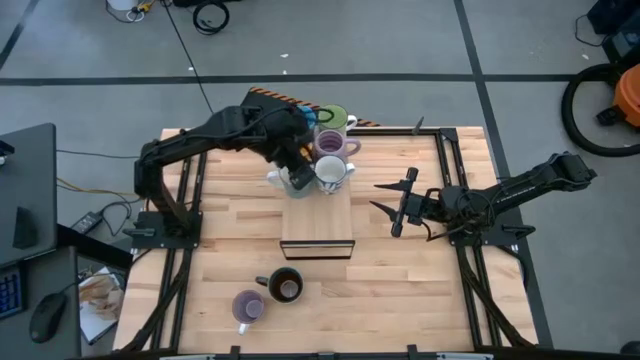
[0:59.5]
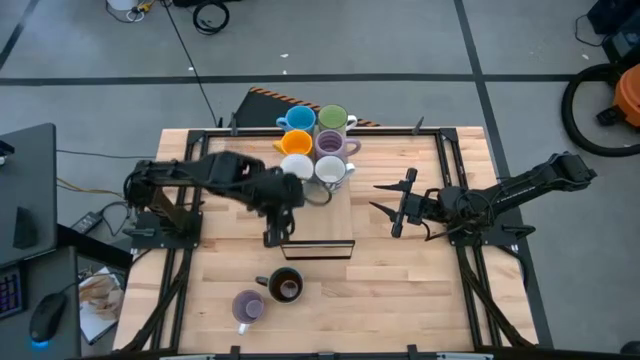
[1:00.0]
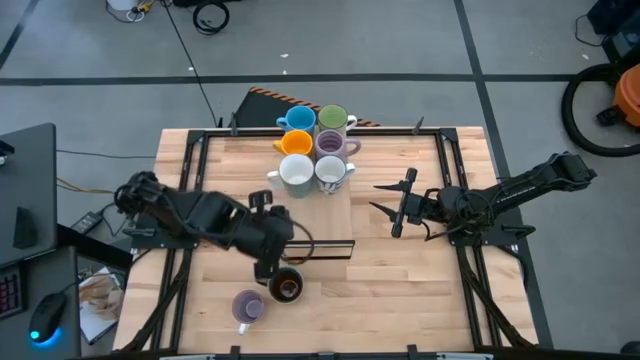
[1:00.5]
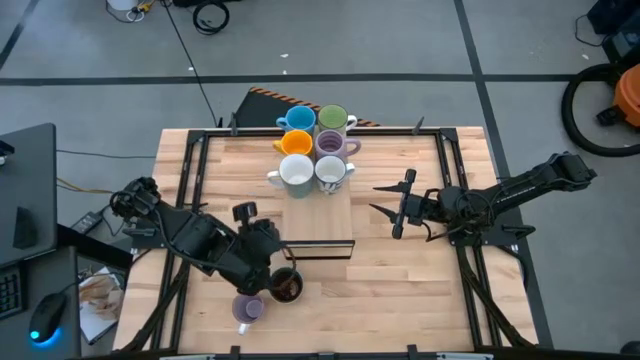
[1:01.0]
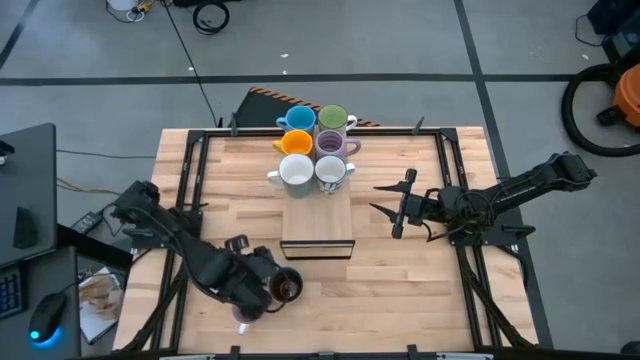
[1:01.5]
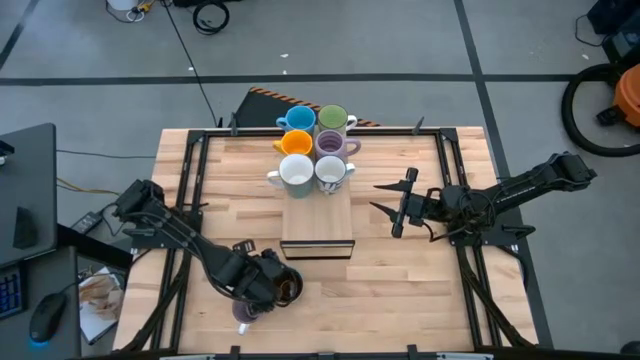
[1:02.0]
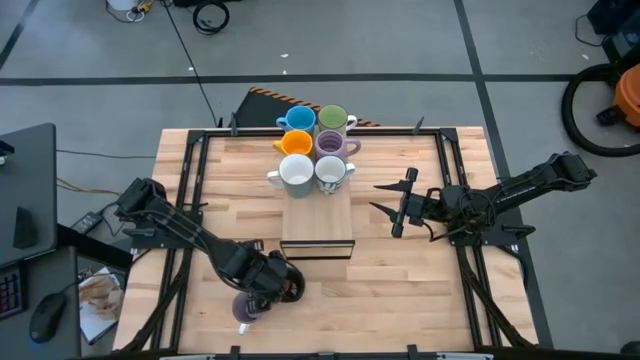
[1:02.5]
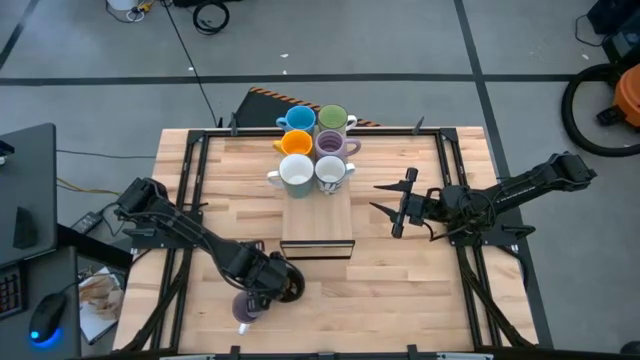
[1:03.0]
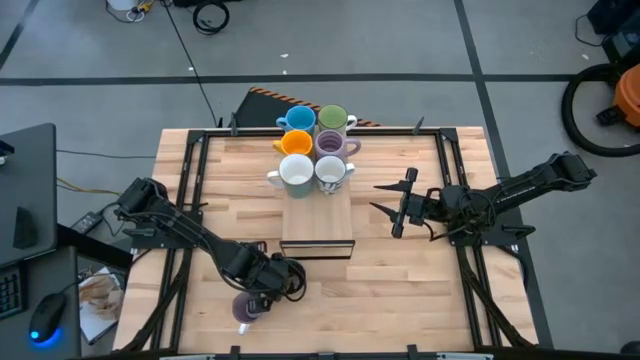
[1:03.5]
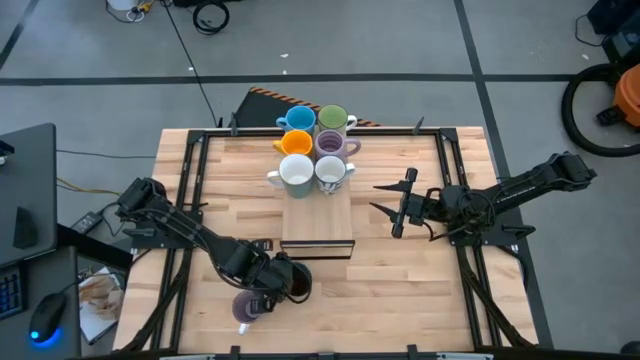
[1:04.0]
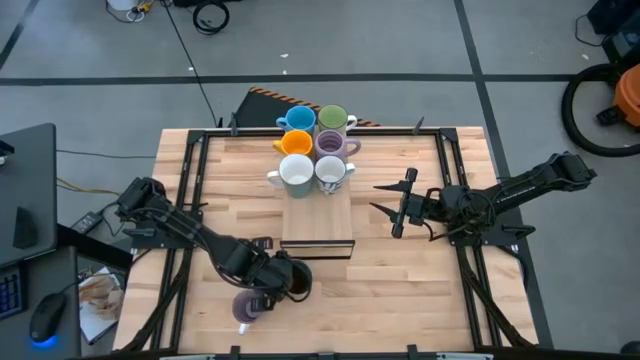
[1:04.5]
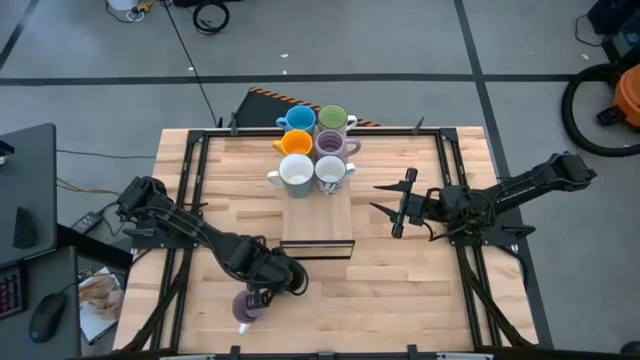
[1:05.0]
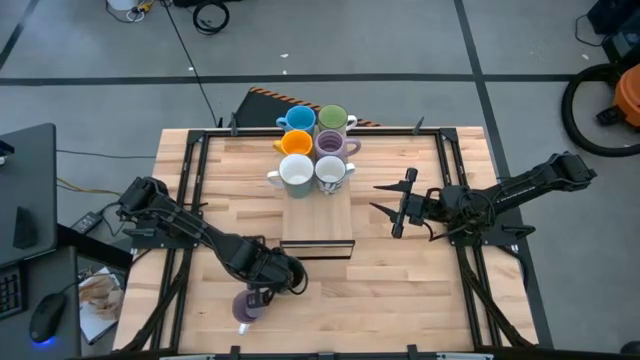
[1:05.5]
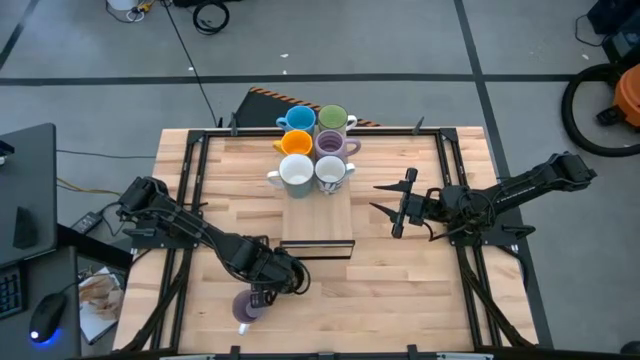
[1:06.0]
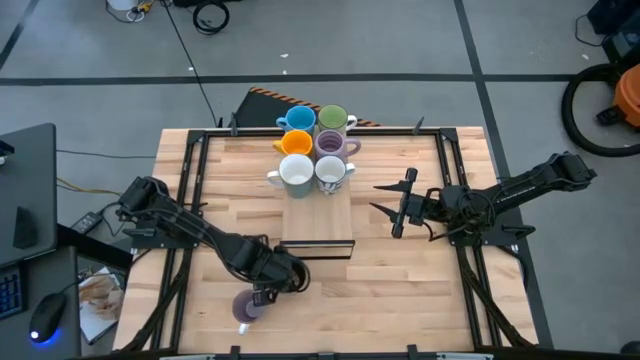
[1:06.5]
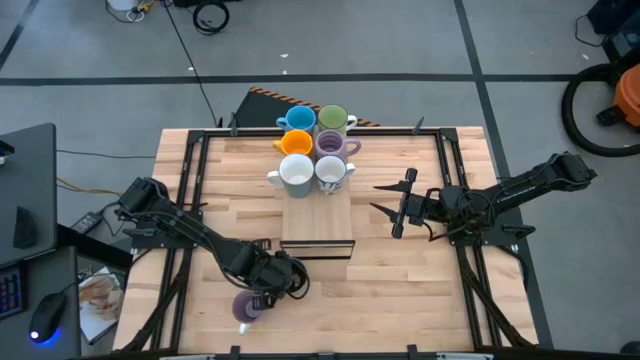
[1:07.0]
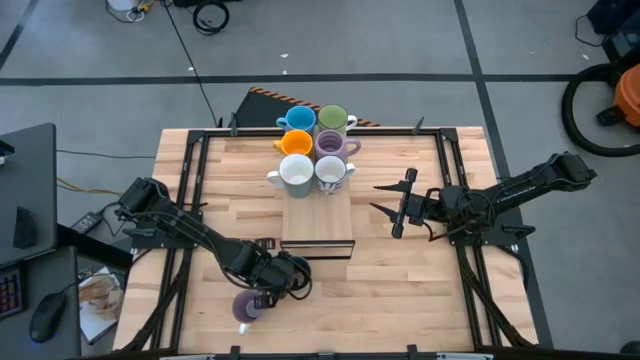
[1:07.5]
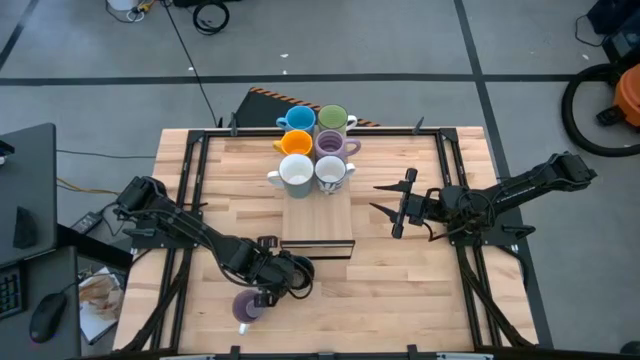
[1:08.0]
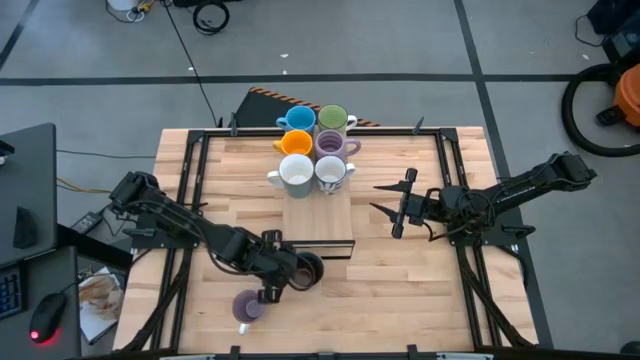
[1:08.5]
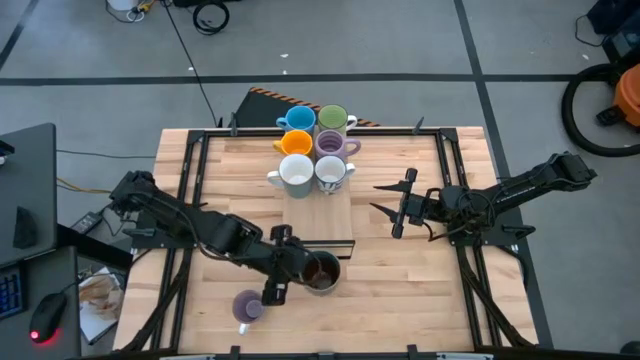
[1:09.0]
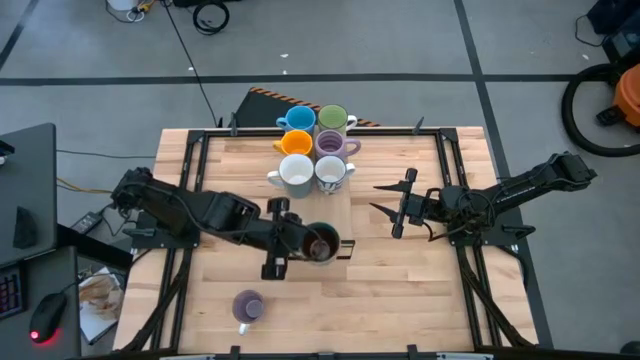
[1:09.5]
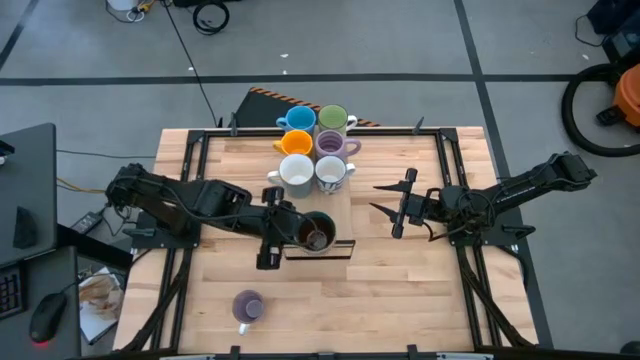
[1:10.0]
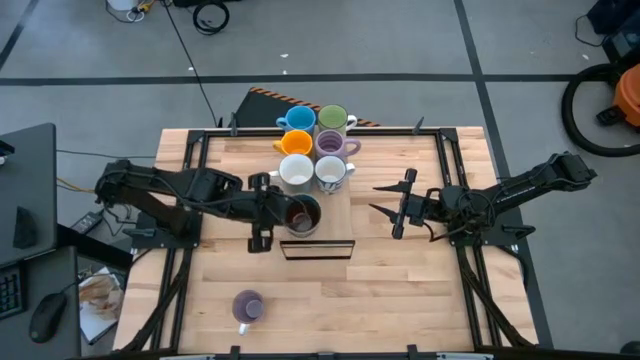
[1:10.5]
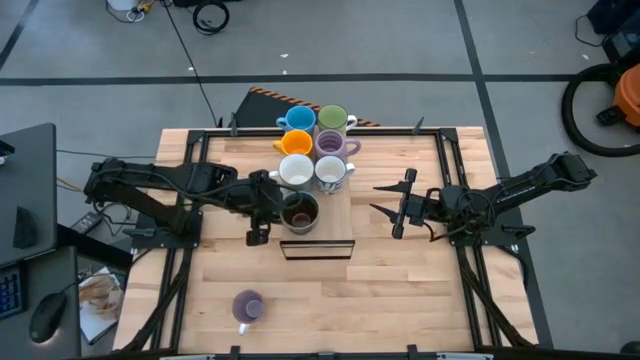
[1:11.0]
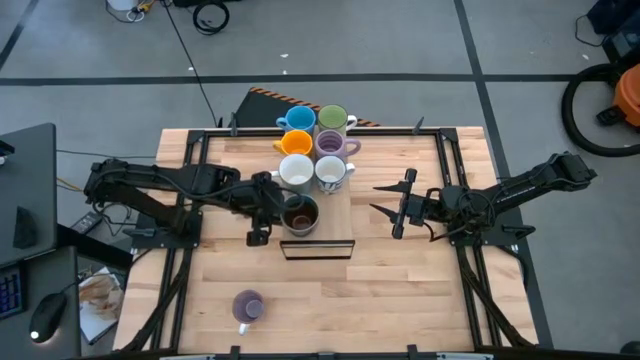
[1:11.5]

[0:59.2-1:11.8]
Task: Place coffee mugs
Put the dark blue mug on the shelf

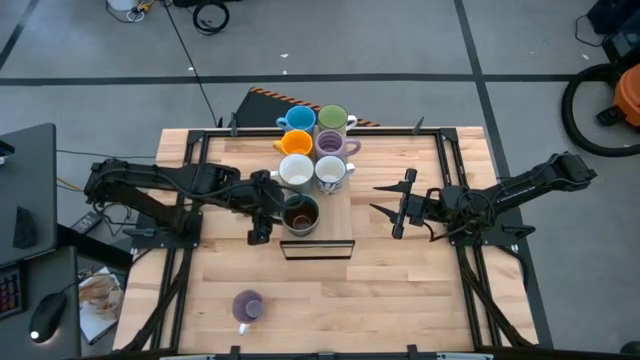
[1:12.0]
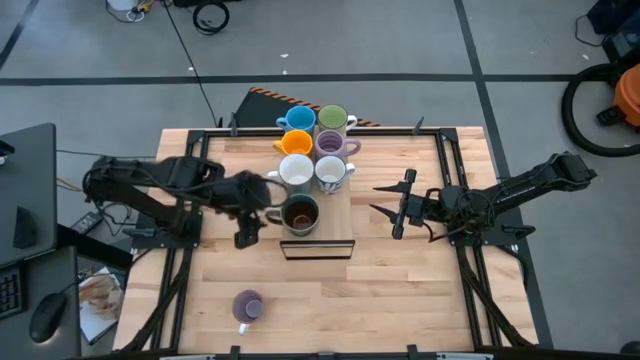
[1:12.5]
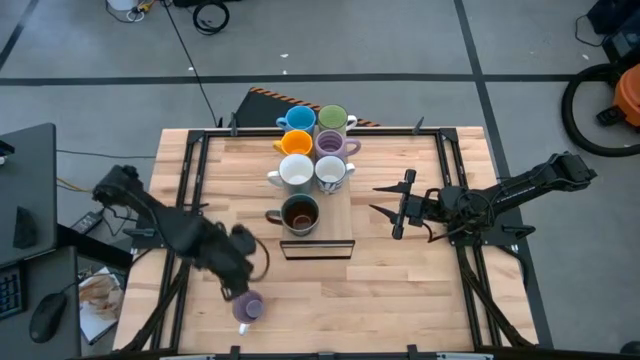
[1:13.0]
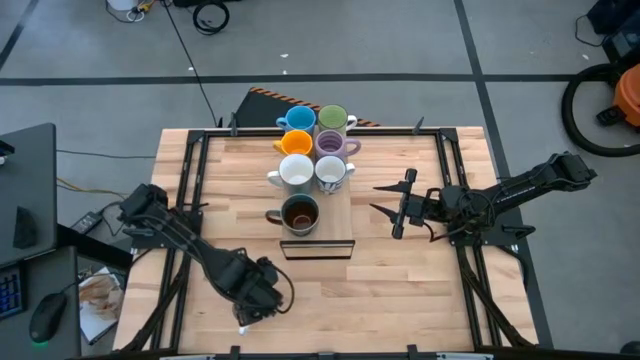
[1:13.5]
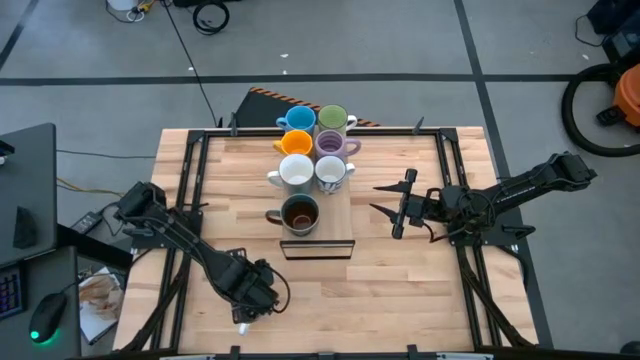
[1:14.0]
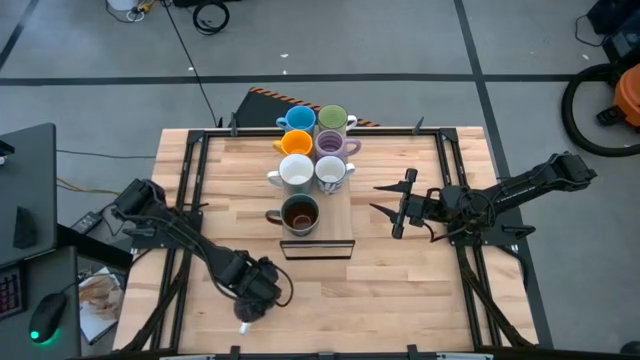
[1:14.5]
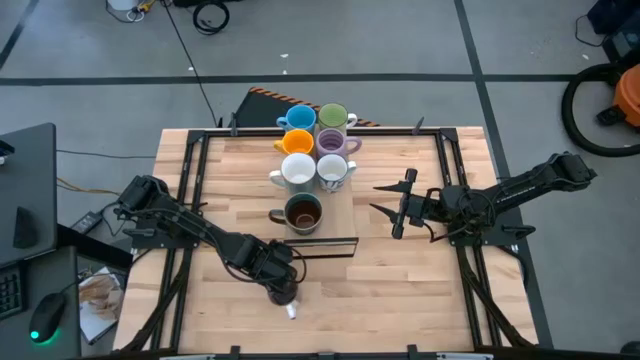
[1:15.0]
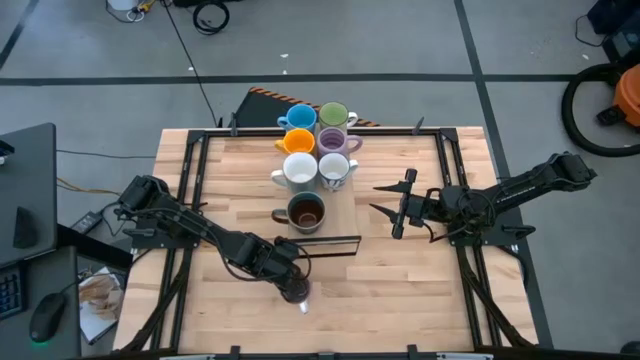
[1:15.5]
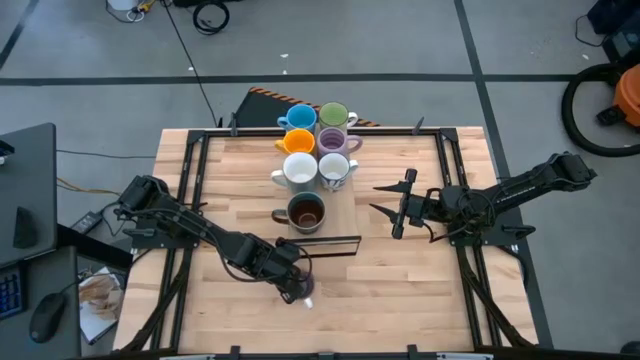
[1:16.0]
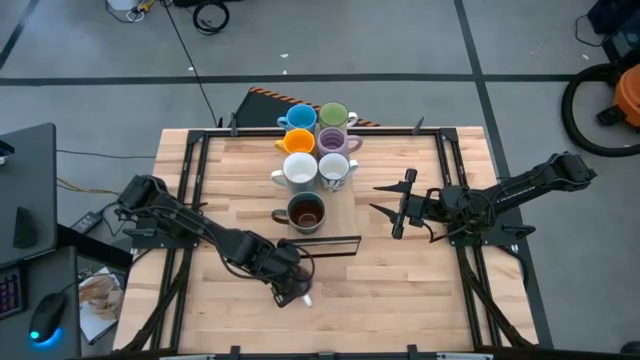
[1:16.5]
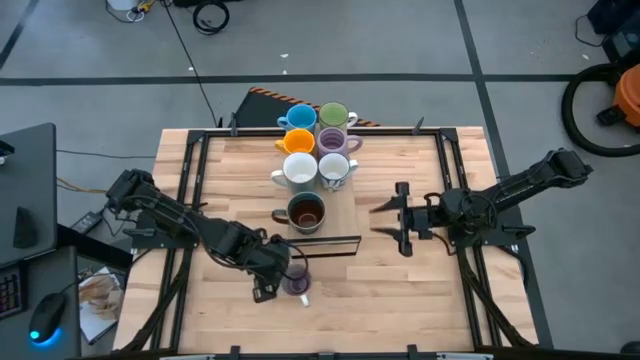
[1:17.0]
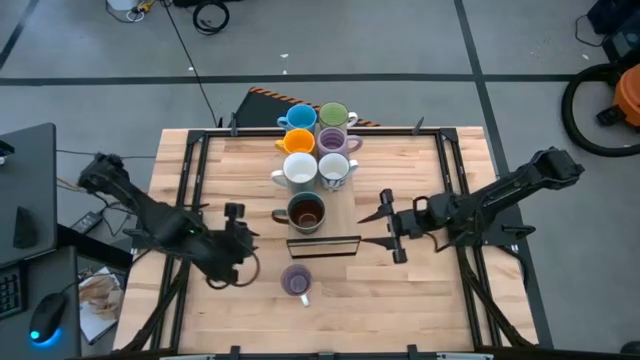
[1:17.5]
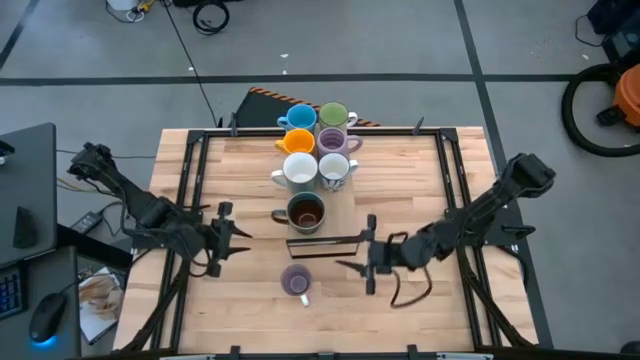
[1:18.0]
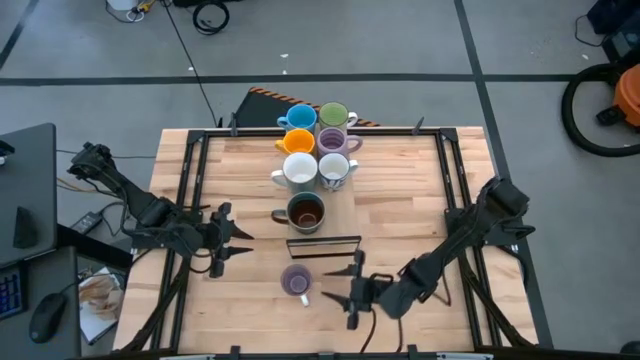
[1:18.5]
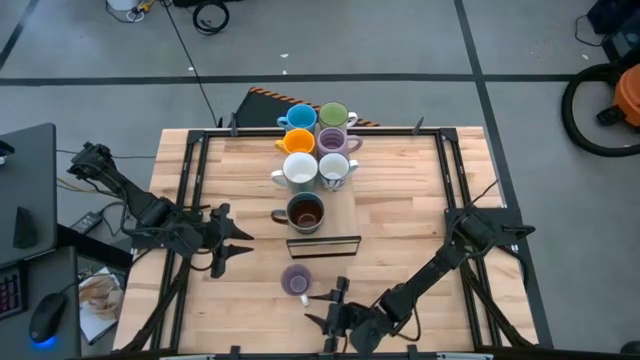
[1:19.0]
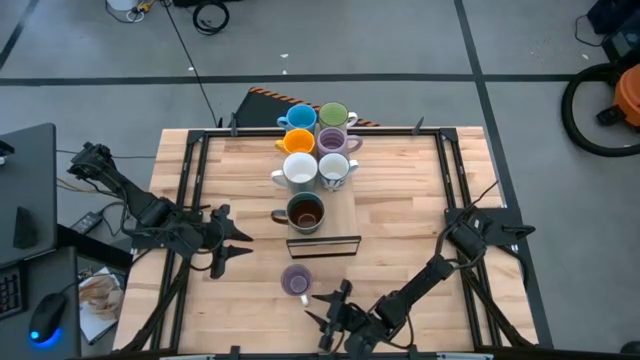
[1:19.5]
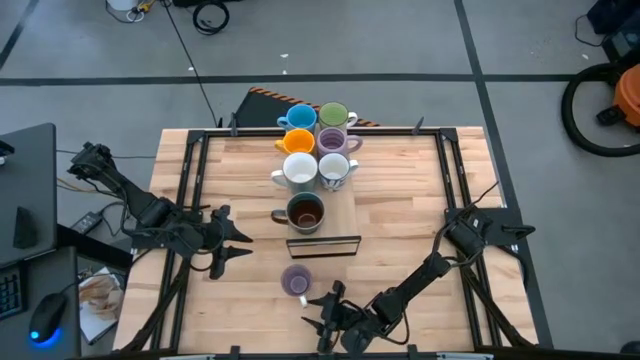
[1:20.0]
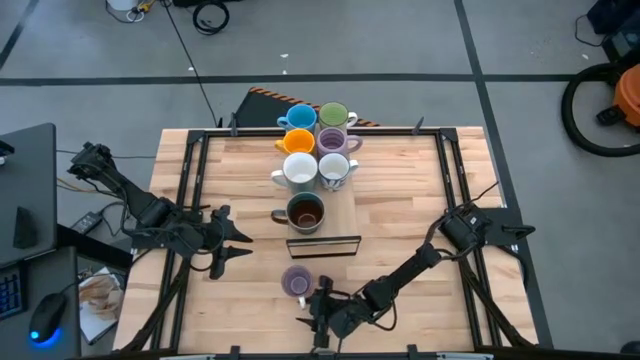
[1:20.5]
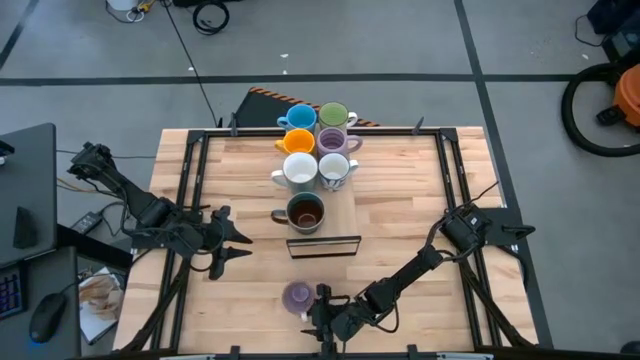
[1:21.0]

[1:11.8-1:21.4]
Put the purple-white mug on the shelf

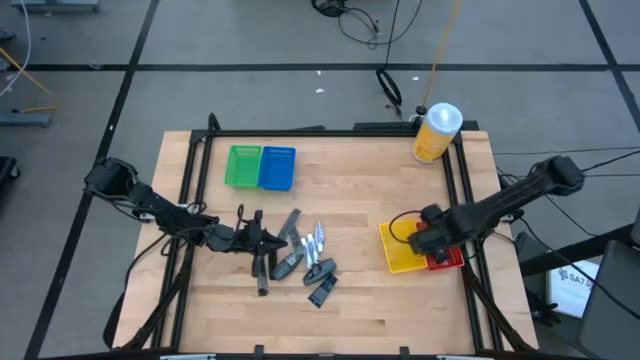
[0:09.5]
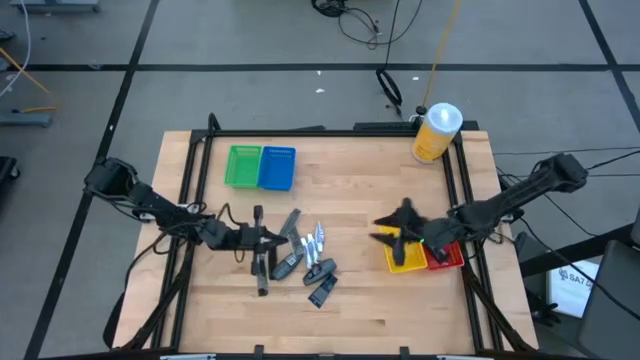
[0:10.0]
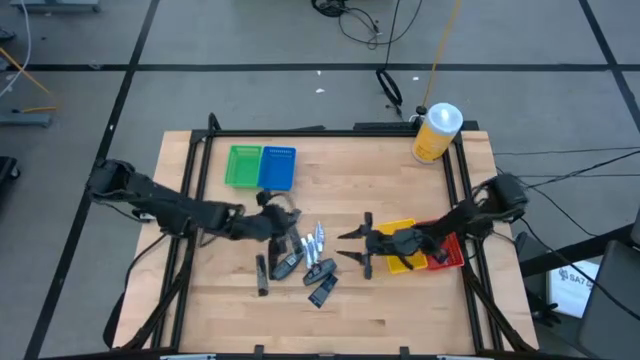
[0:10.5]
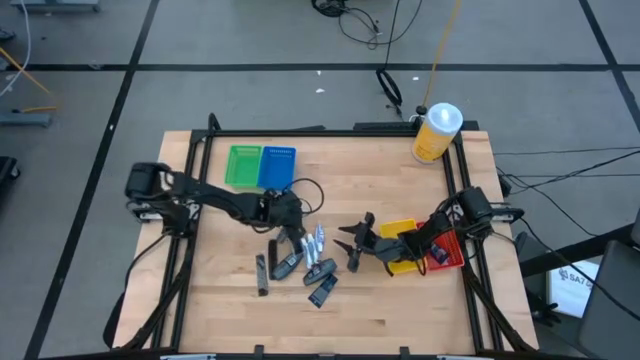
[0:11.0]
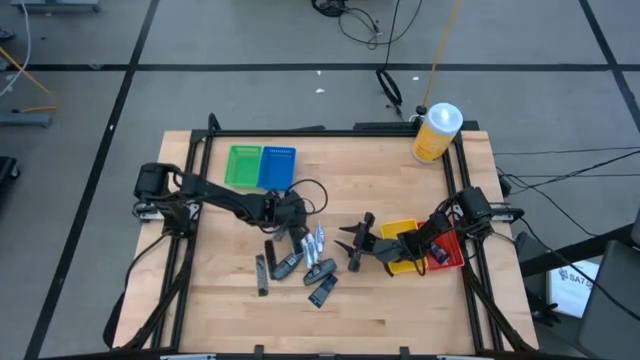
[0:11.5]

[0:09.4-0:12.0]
Task: Pick & Place Travel size toiletries
Put the black comb into the blue bin
